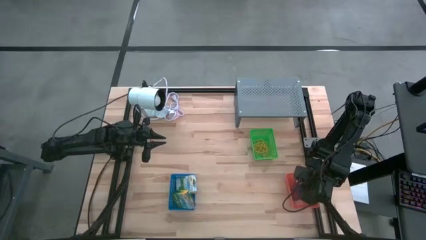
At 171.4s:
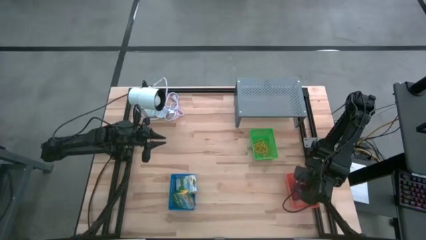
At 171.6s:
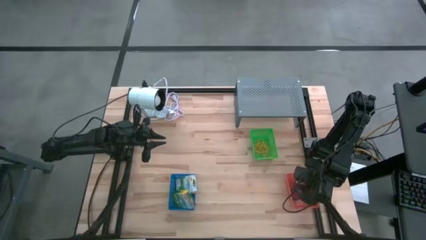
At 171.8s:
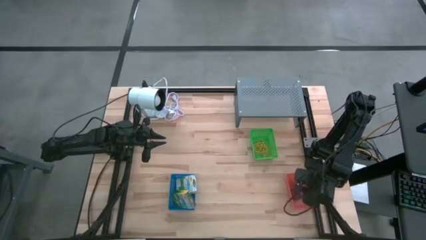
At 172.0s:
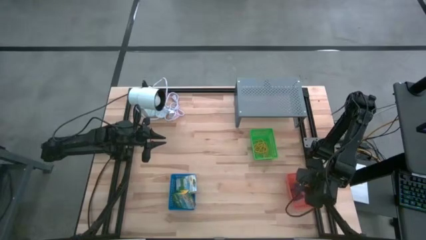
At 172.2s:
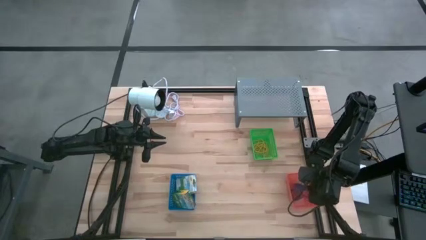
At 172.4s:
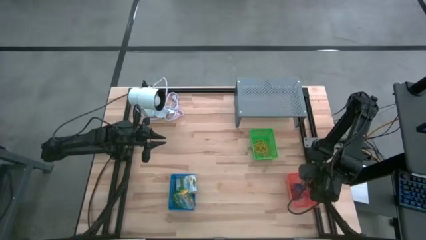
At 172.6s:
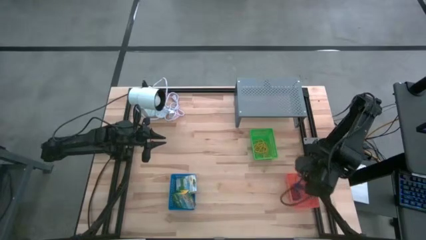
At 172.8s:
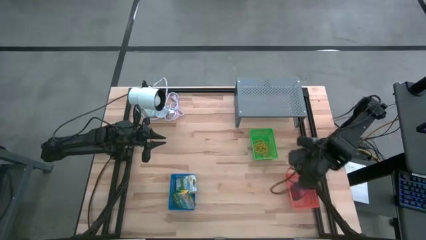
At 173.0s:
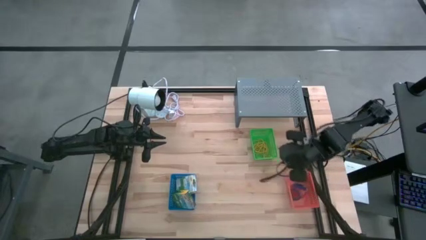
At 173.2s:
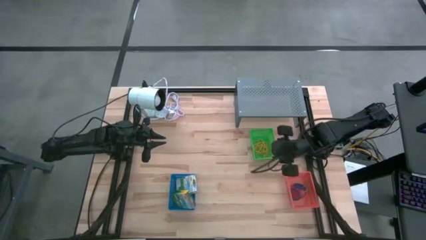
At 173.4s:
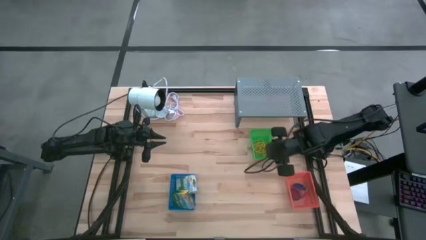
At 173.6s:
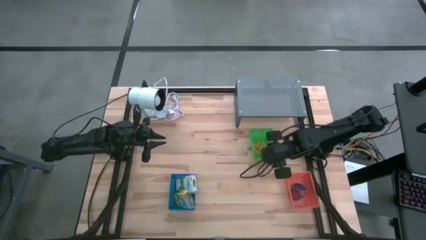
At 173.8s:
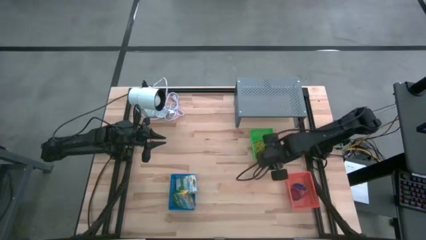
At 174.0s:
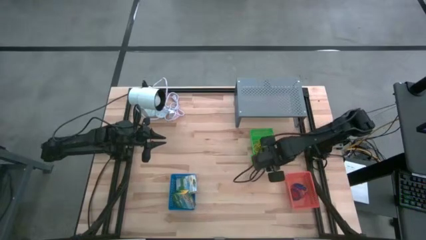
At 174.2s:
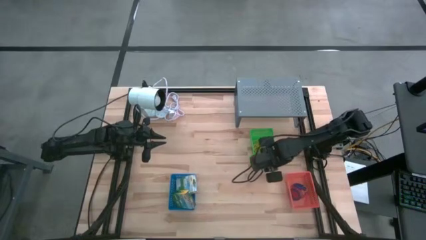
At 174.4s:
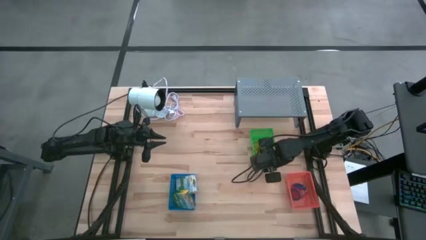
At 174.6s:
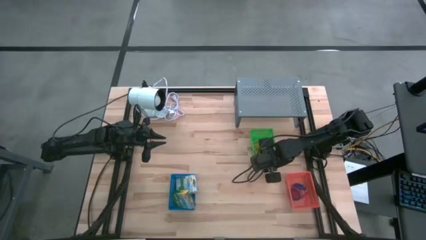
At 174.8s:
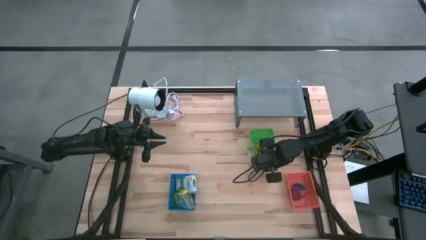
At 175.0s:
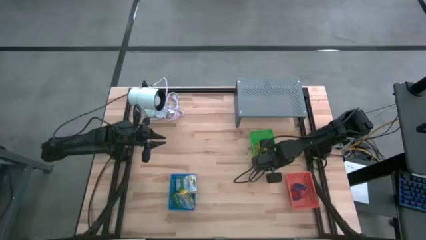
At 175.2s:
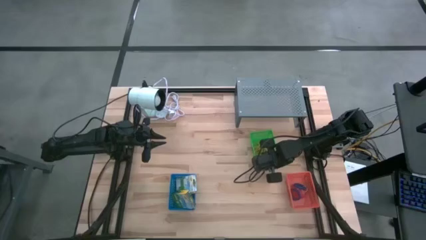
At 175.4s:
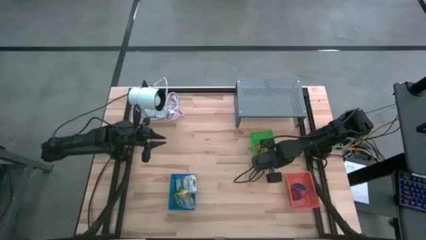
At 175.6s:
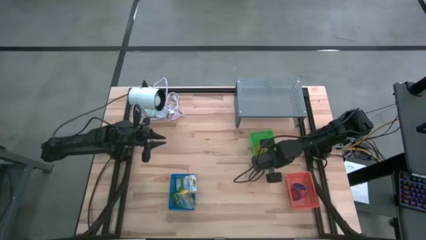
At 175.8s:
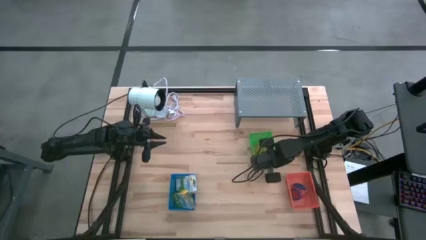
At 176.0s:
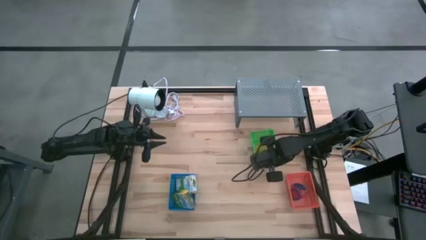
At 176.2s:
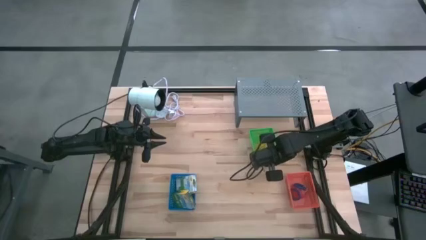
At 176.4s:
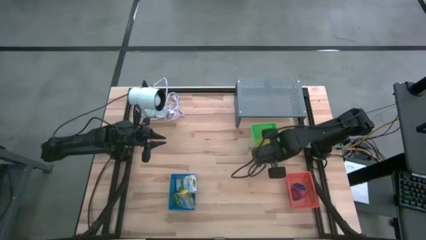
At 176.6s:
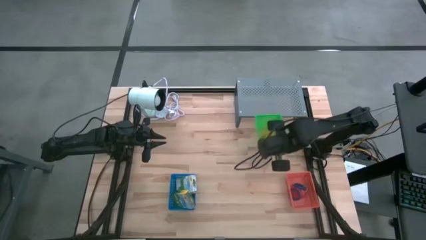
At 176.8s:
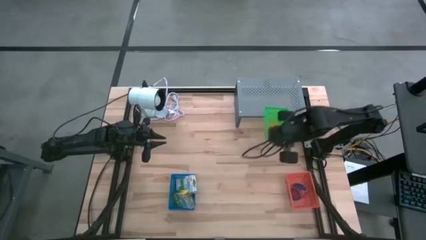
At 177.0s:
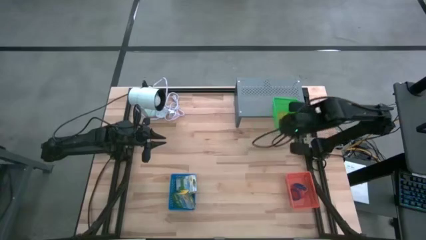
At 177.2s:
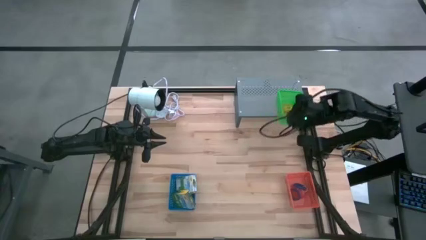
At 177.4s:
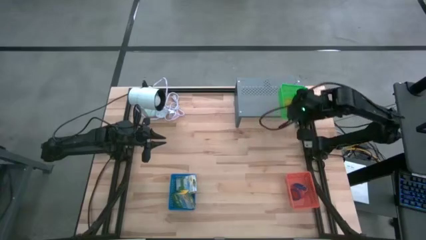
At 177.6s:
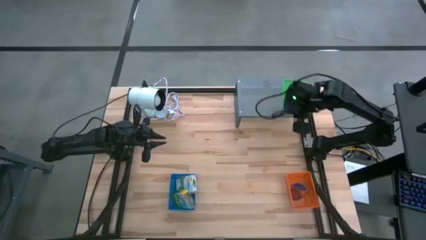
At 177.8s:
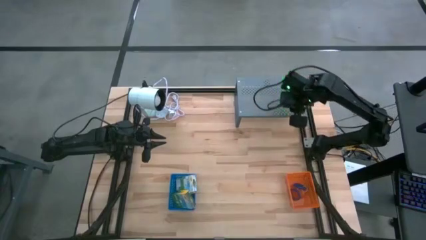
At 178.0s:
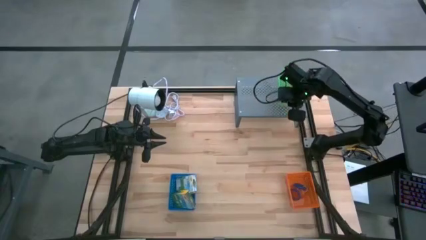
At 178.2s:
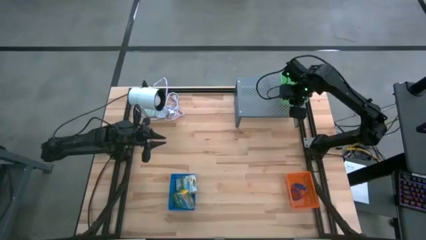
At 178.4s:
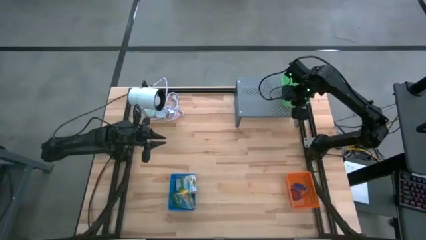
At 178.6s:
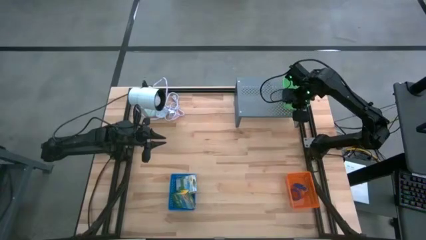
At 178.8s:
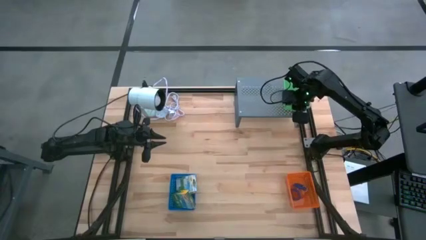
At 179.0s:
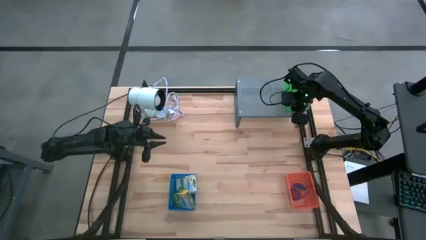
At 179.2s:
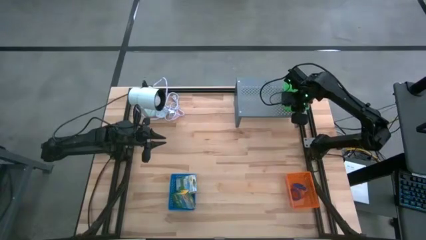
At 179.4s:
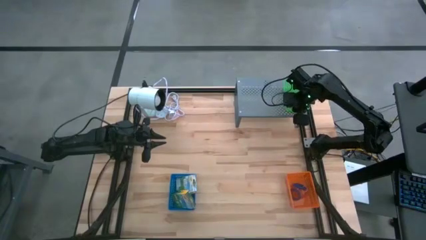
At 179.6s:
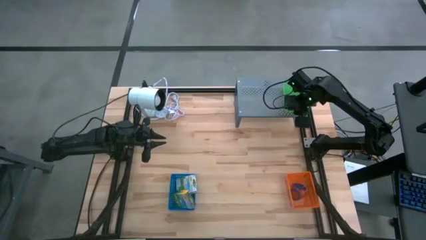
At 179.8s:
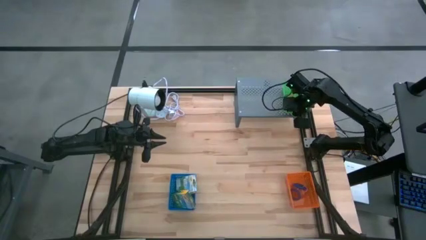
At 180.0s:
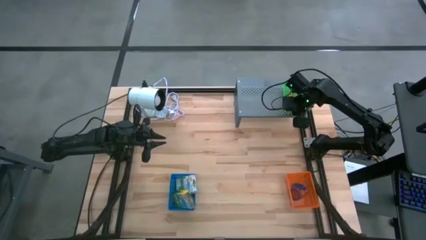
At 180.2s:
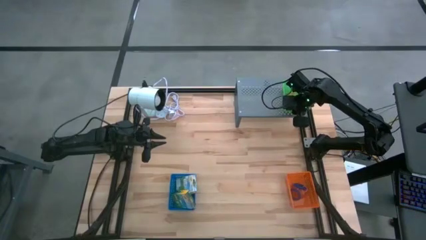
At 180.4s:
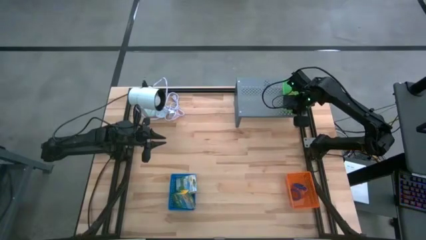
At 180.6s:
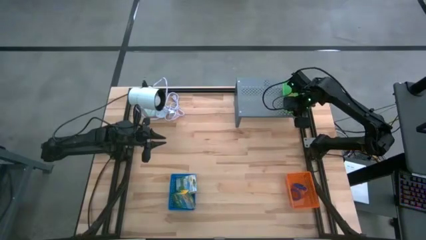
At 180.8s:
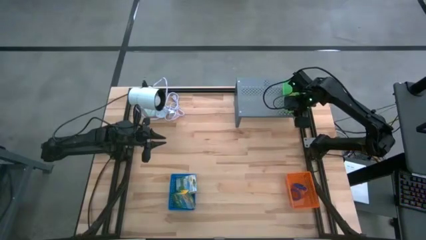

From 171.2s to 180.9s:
Task: Pick & Place Office Desk Supplies
Put the green bin on the shelf

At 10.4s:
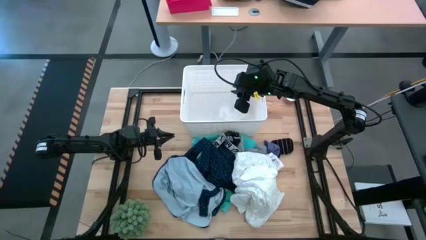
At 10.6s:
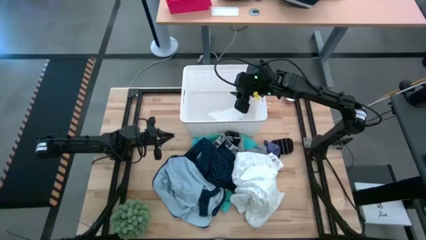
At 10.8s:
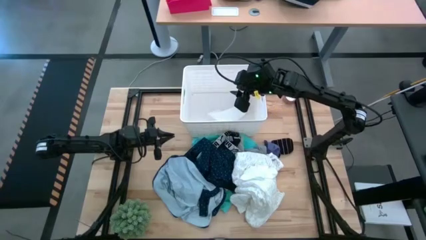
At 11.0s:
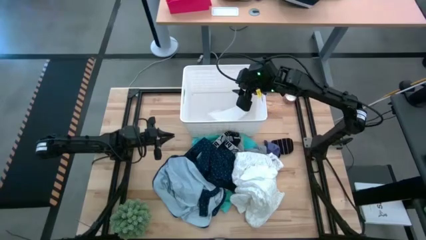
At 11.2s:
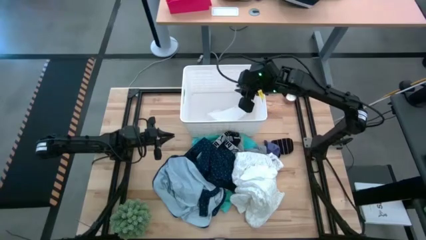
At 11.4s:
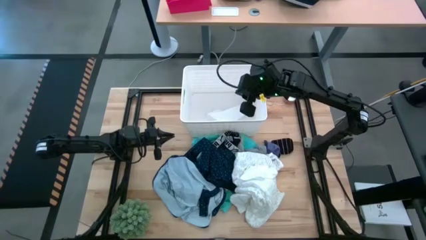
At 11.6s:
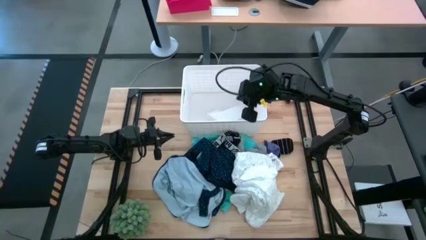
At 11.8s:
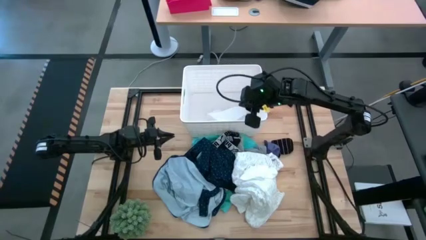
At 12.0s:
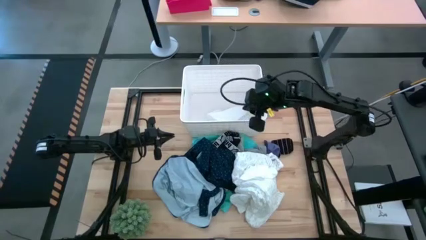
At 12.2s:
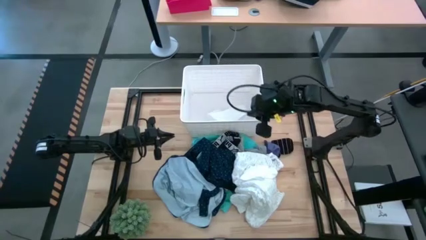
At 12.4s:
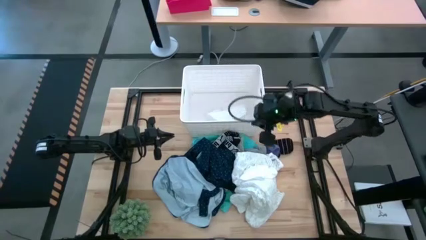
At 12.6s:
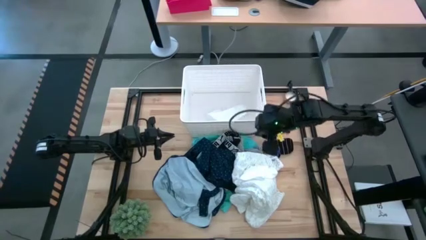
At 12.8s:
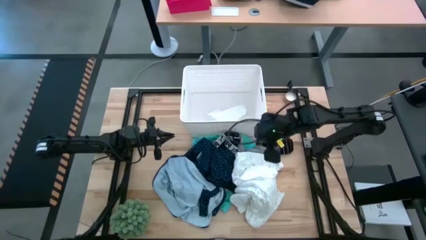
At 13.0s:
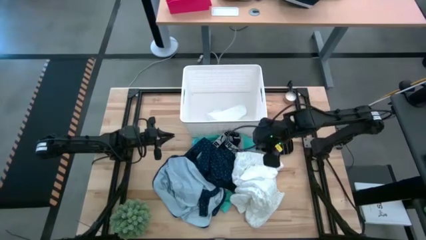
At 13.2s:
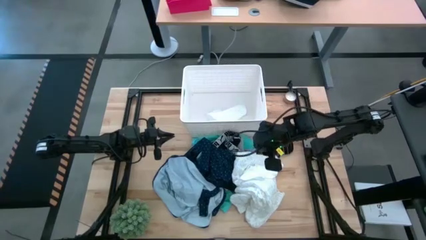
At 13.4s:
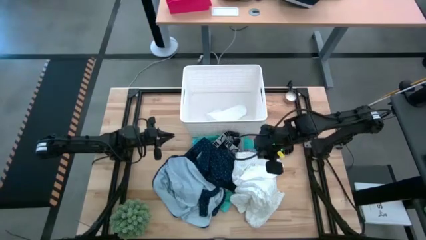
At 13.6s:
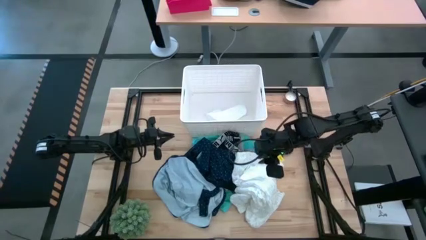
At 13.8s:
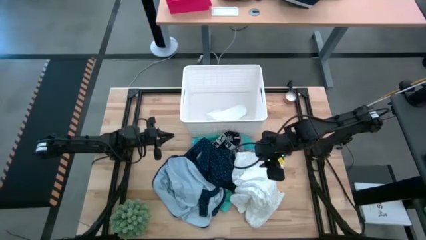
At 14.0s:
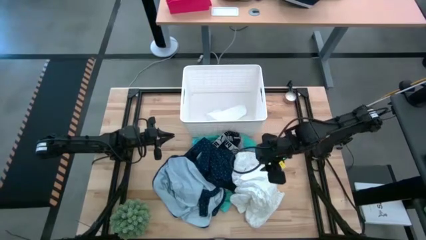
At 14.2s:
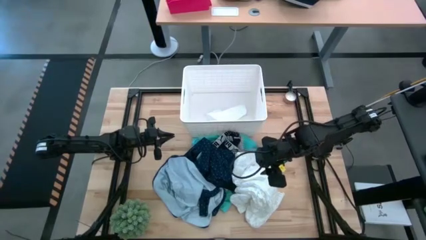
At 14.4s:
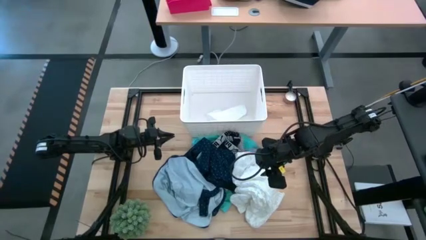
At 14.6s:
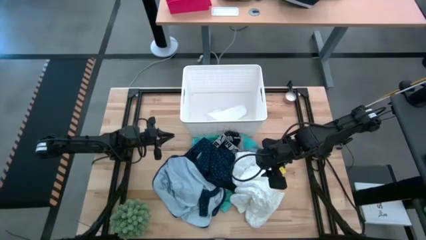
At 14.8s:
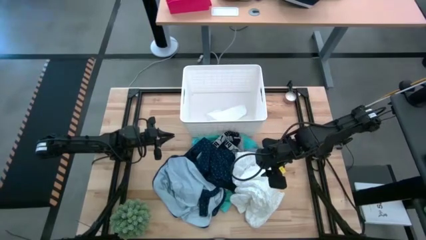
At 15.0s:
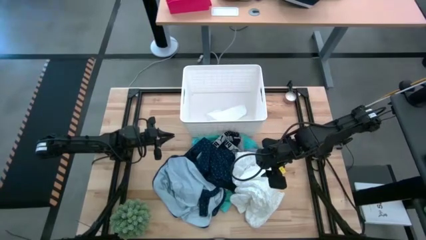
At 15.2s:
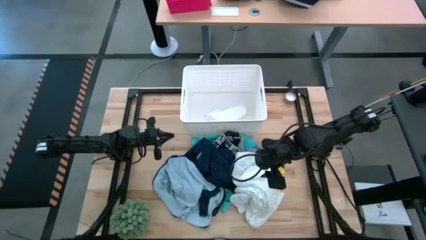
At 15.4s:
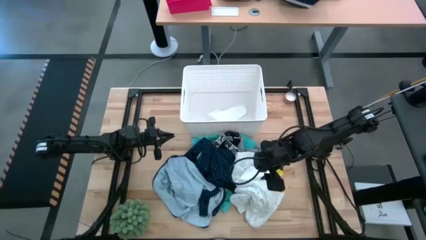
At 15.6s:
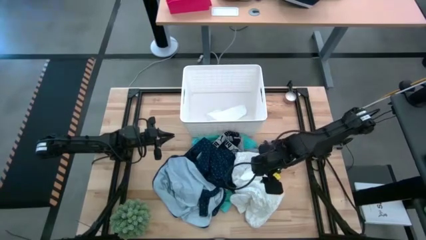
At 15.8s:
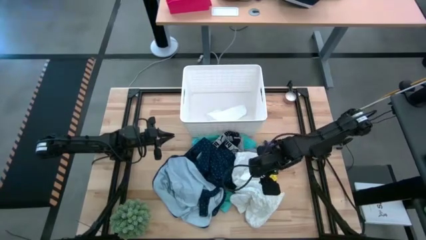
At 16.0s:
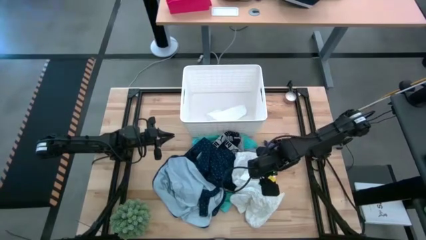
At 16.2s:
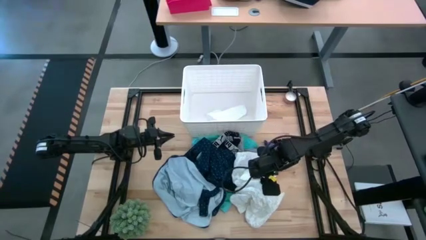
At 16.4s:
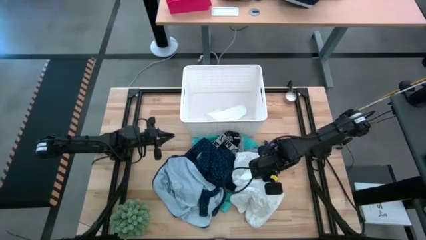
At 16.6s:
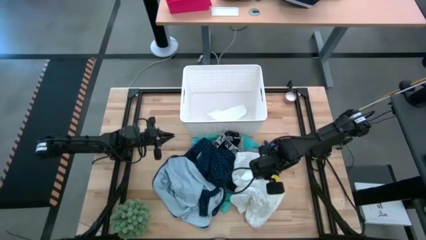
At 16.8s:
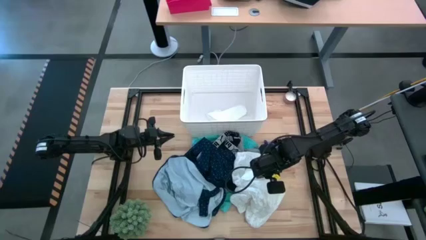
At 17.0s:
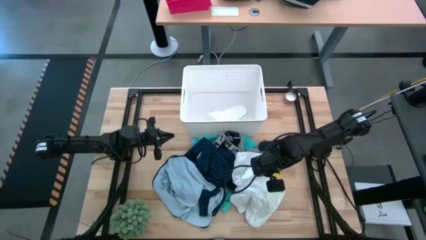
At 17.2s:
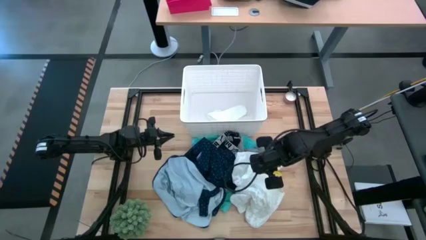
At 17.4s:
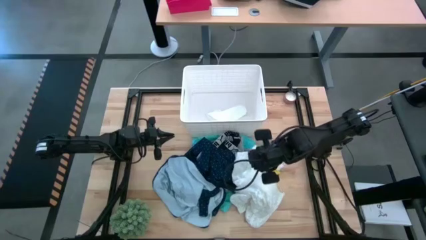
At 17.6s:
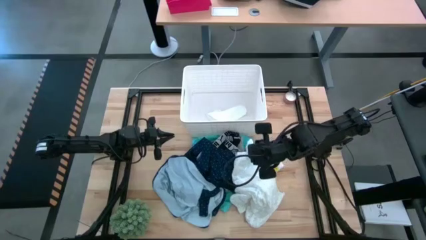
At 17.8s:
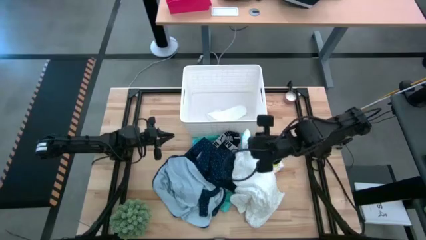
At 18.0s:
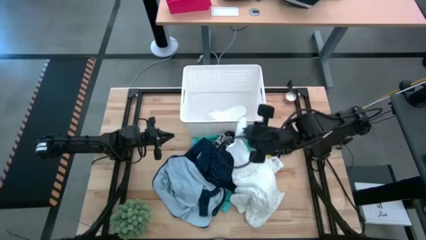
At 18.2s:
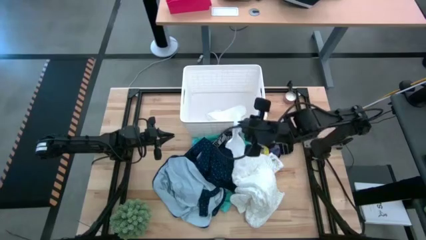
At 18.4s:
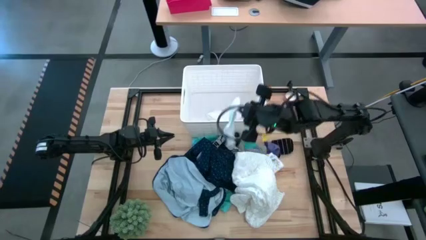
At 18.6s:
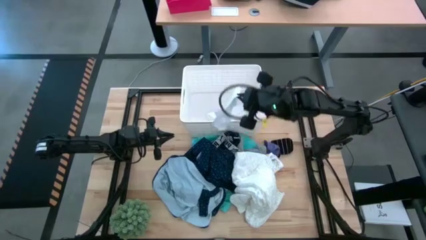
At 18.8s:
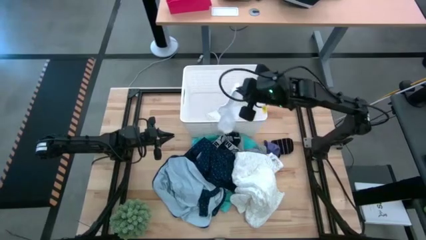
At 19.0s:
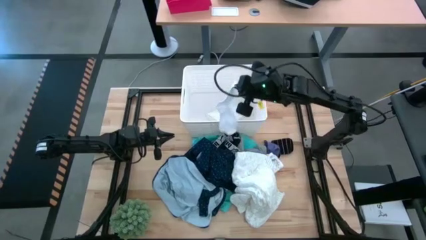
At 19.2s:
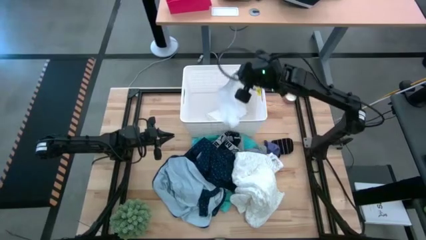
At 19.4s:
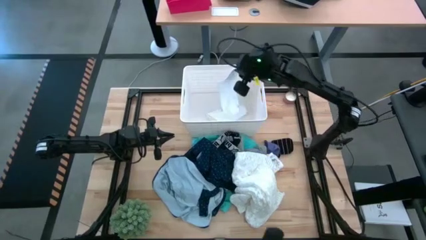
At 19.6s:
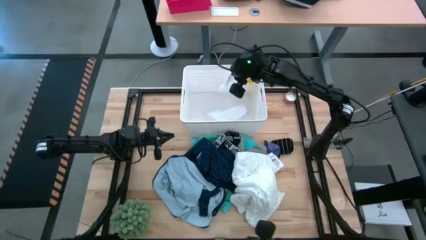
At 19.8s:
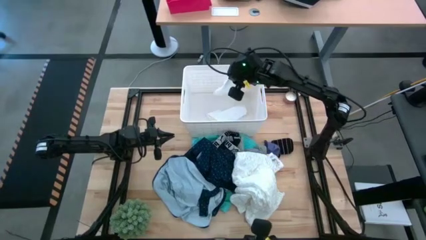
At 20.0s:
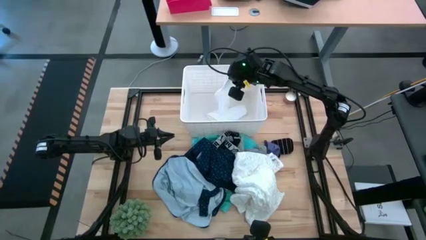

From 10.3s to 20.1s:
Task: Sort clothes
Put the white socks into the white bin
